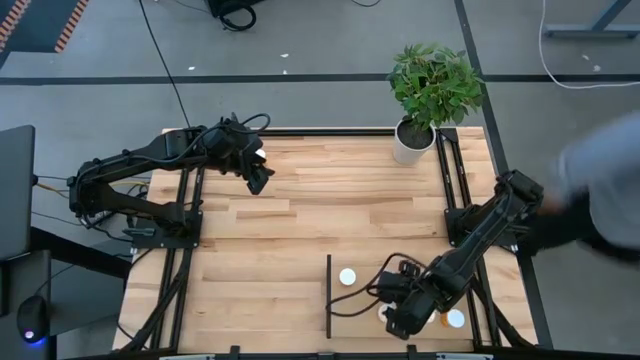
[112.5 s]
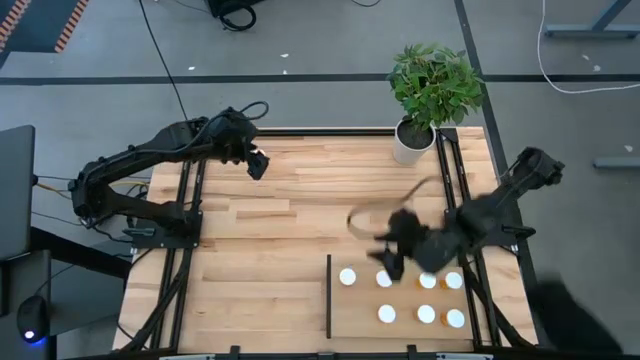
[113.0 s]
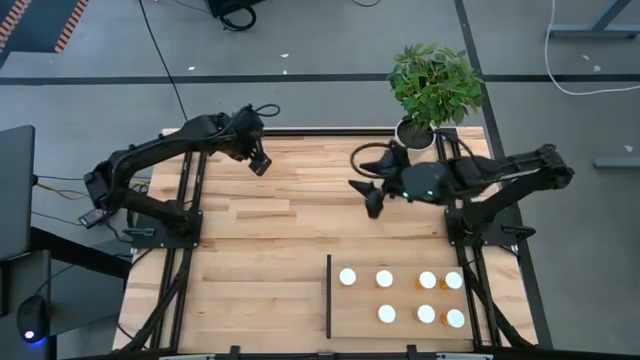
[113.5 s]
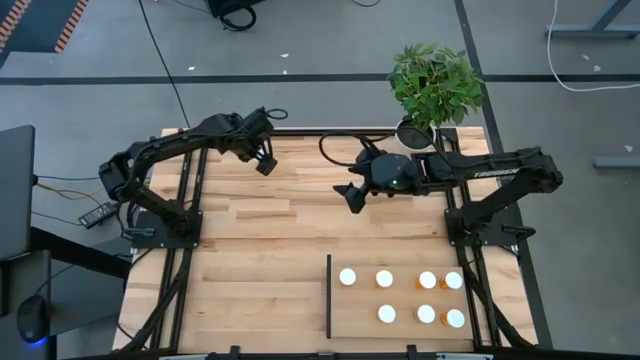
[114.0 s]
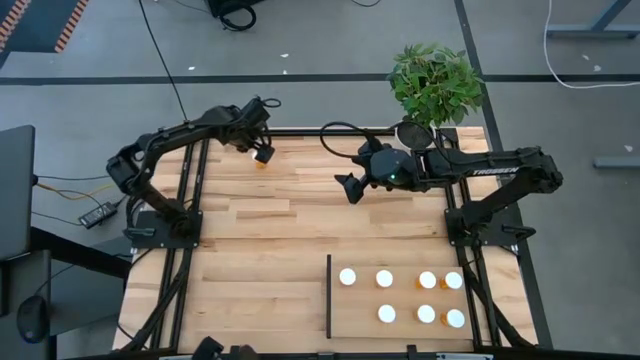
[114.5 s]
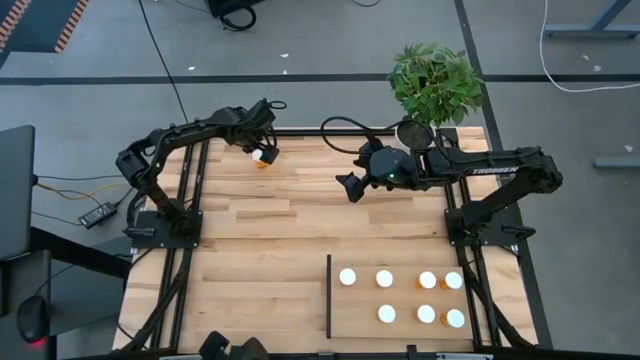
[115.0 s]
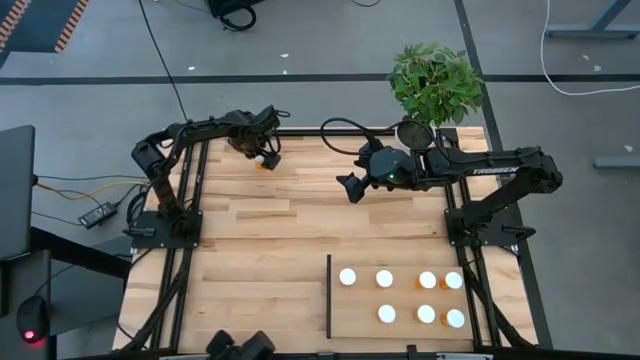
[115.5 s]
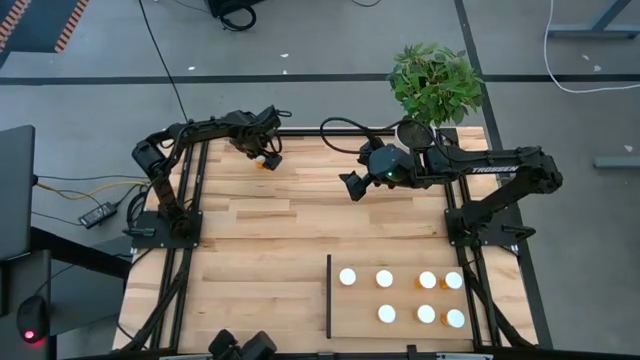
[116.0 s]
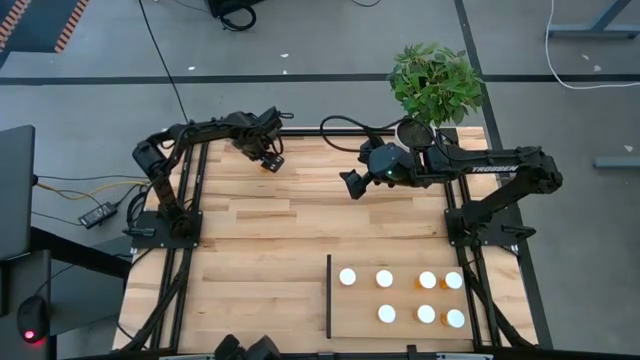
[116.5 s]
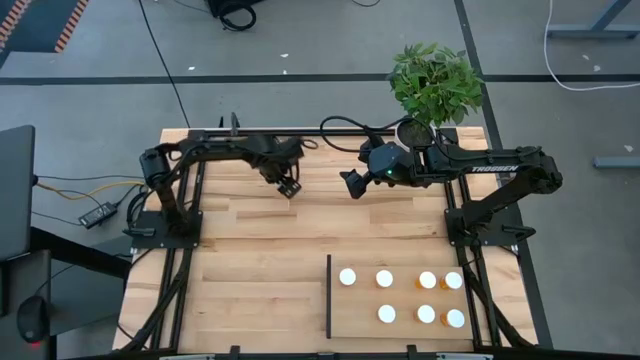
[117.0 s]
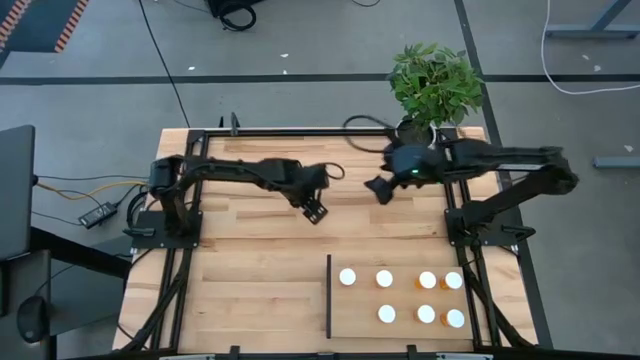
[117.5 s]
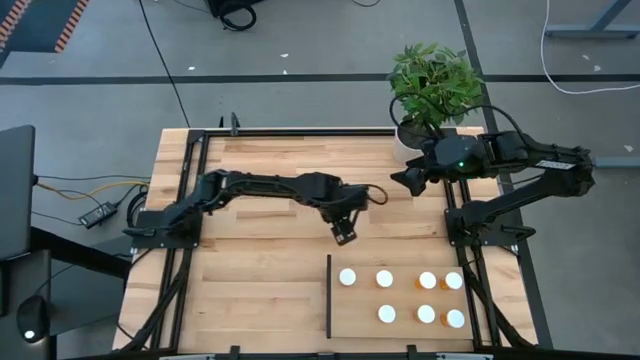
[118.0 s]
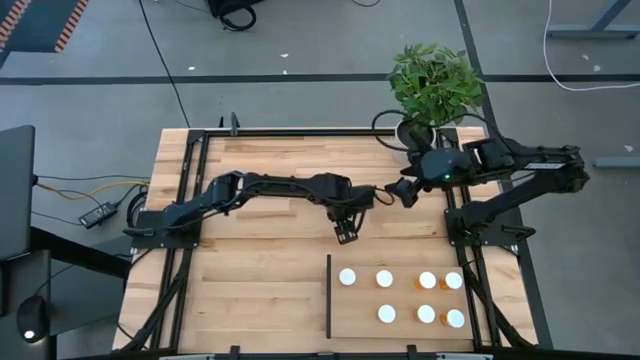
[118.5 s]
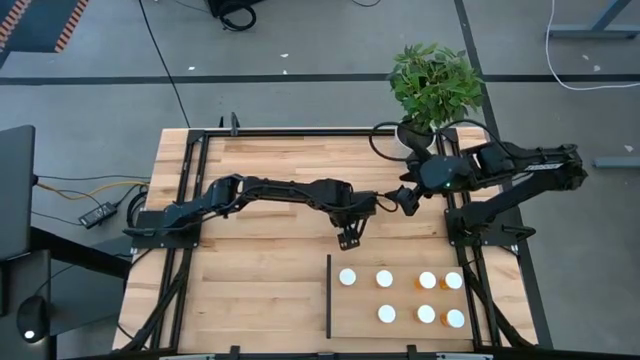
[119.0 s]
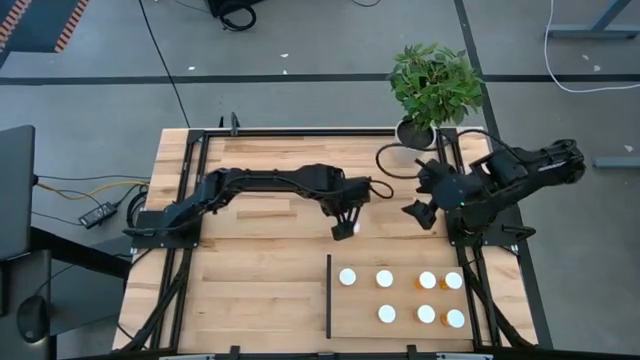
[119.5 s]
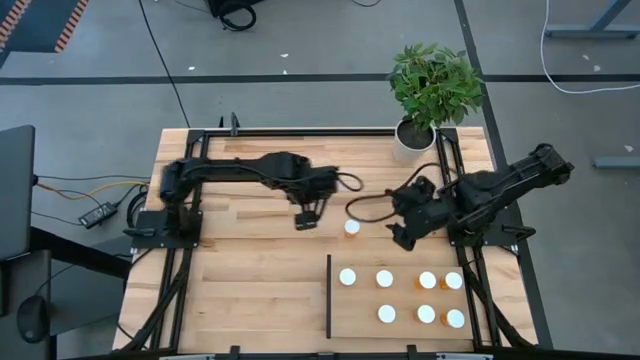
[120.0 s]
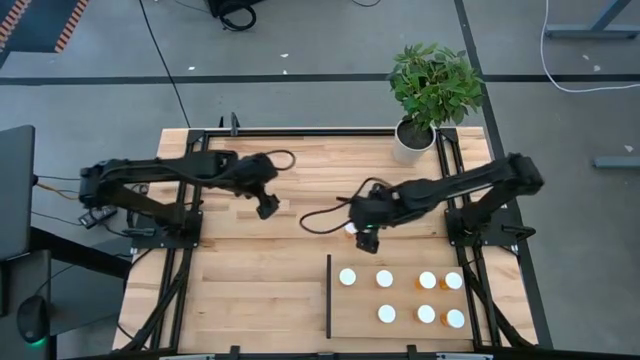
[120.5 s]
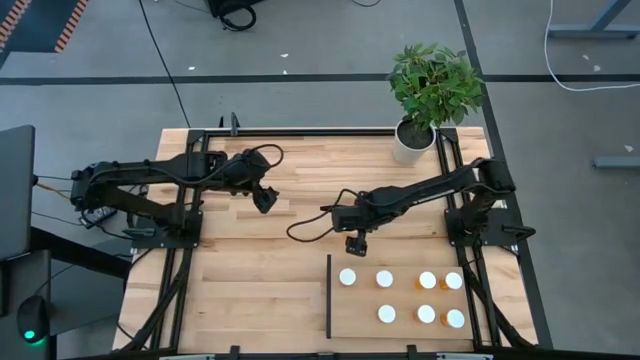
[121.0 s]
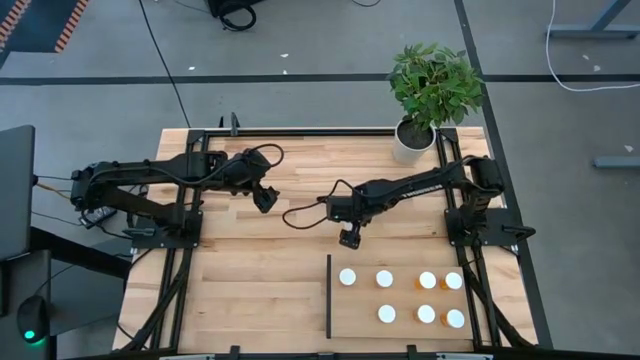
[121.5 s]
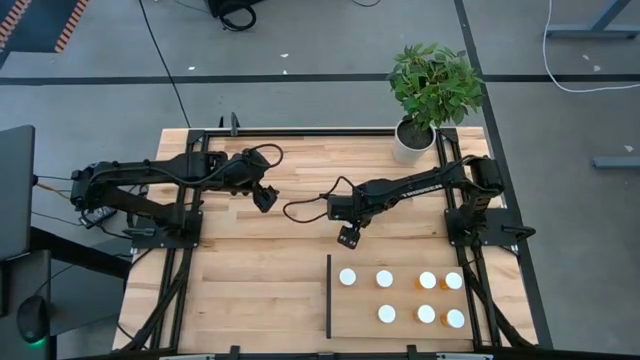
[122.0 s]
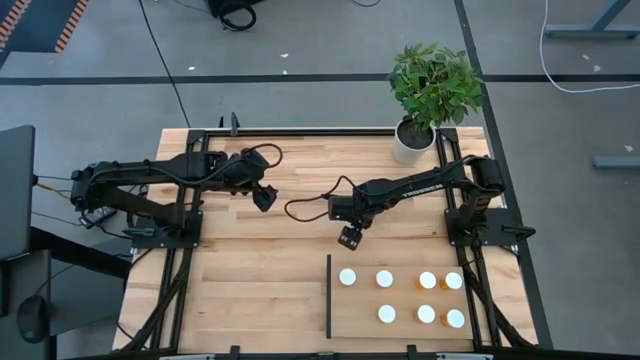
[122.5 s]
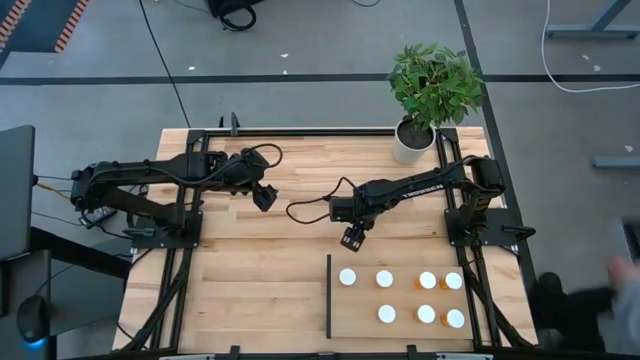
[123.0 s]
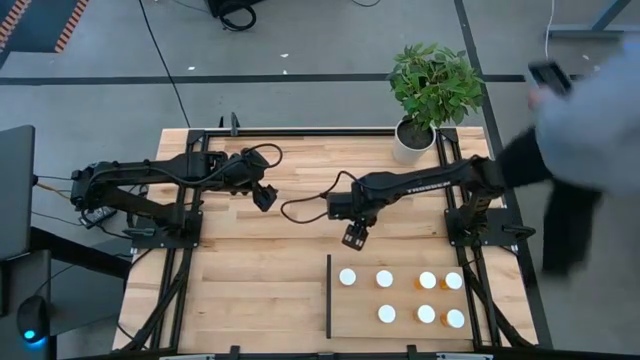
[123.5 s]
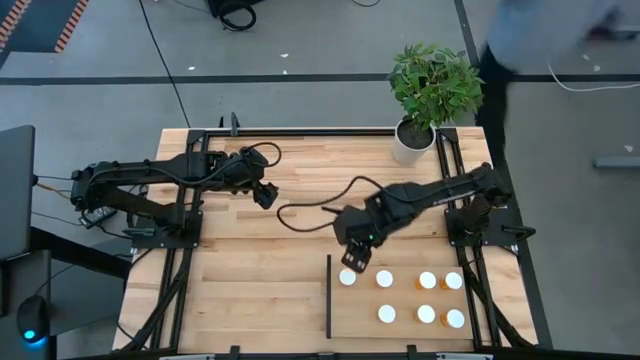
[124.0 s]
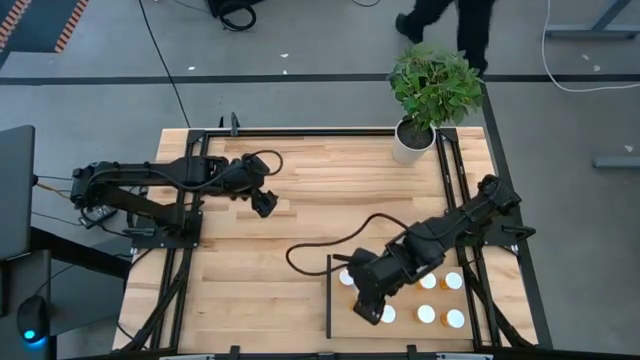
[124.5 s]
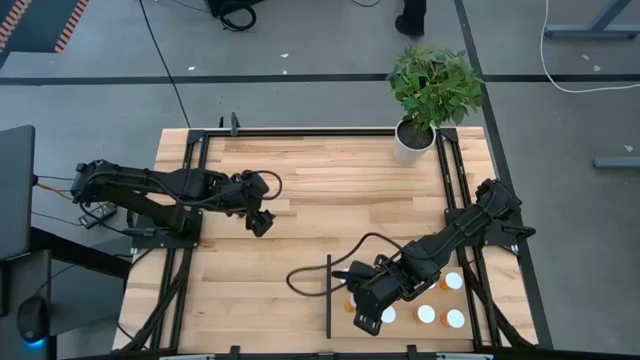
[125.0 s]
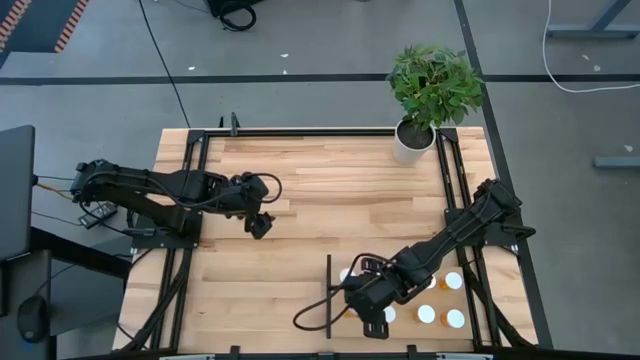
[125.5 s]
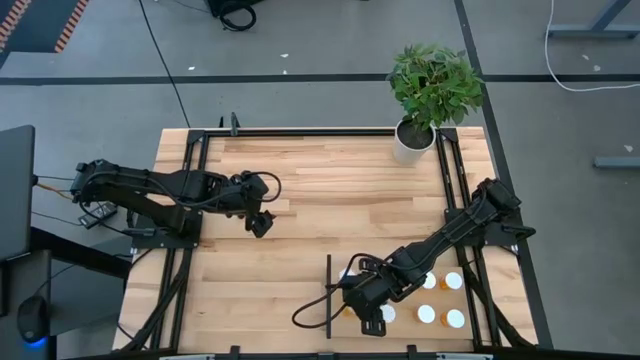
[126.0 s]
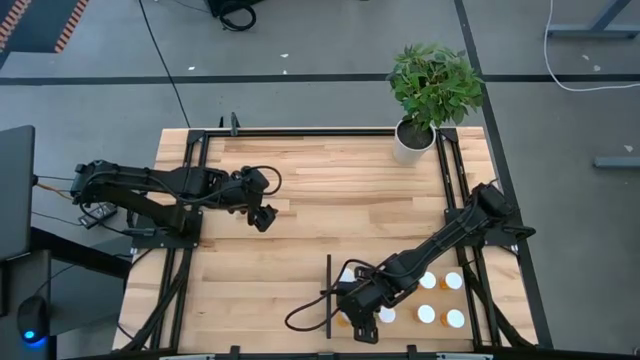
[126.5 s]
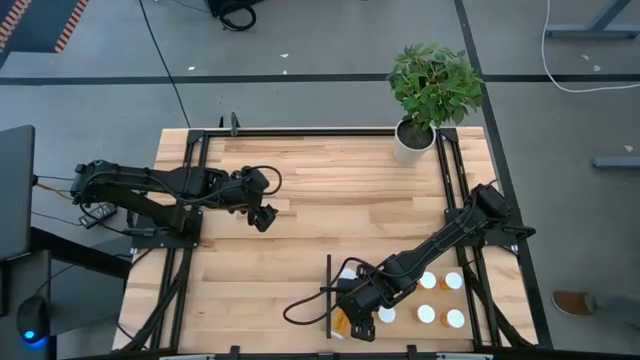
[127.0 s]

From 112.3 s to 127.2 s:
Task: Pick and place medicine bottles onto shelf by color
Put the orange pill bottle on the shelf aligned with the other orange pill bottles

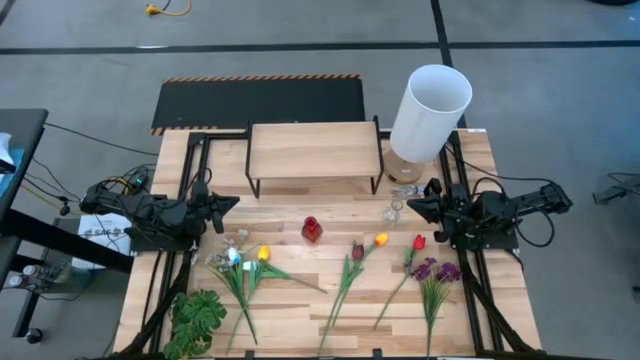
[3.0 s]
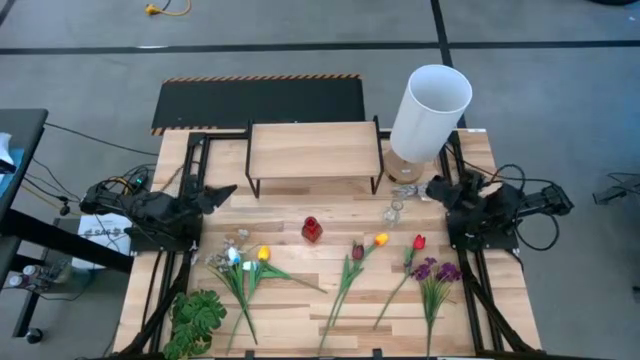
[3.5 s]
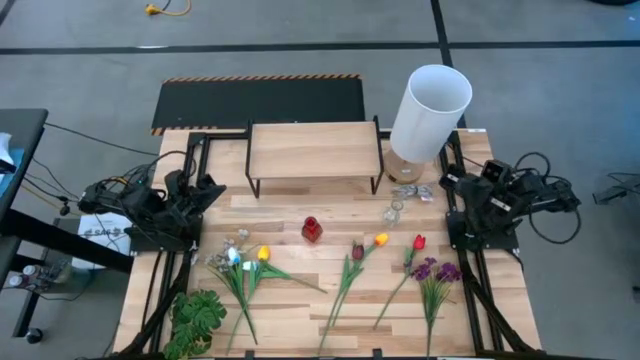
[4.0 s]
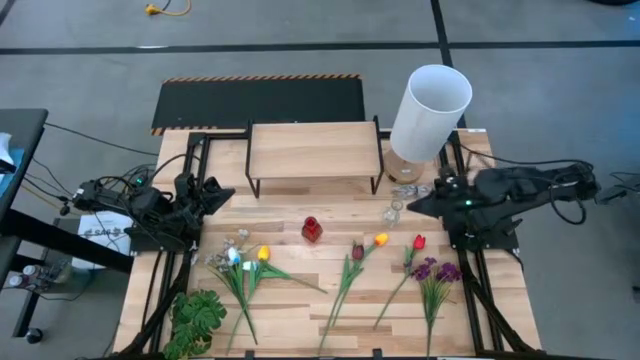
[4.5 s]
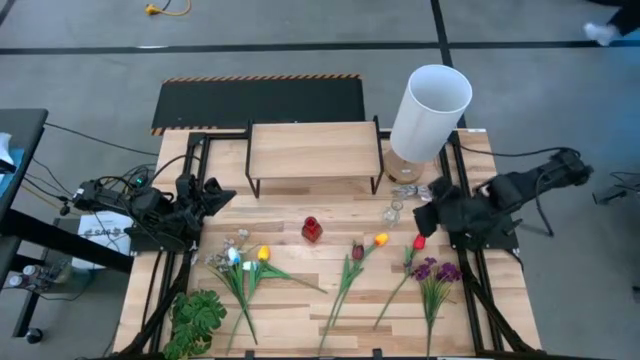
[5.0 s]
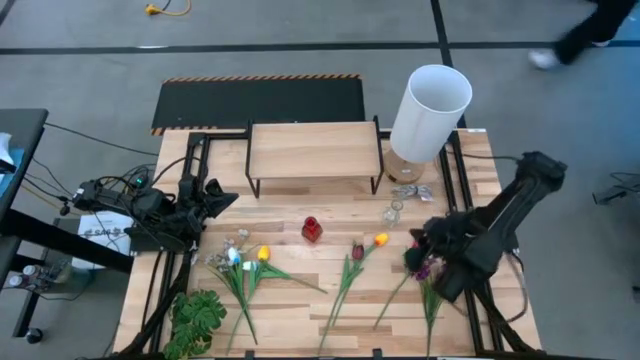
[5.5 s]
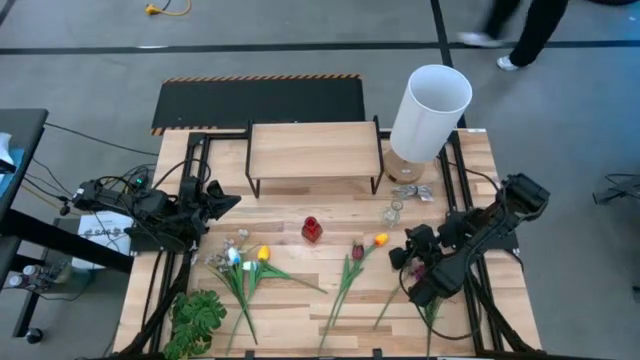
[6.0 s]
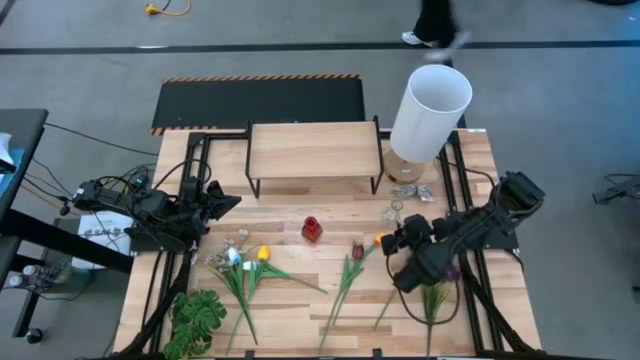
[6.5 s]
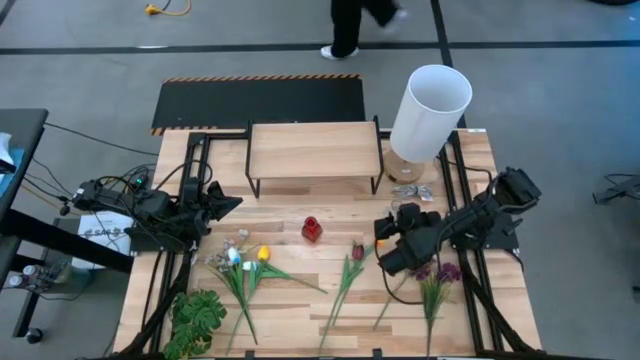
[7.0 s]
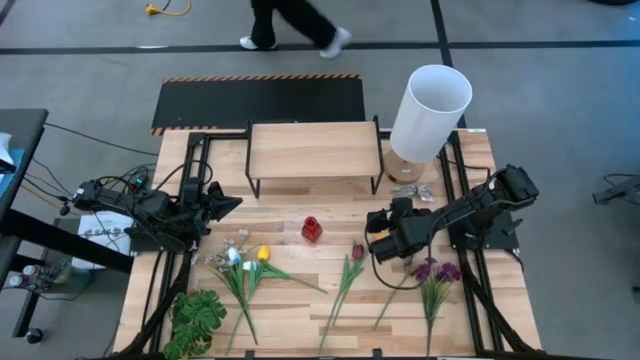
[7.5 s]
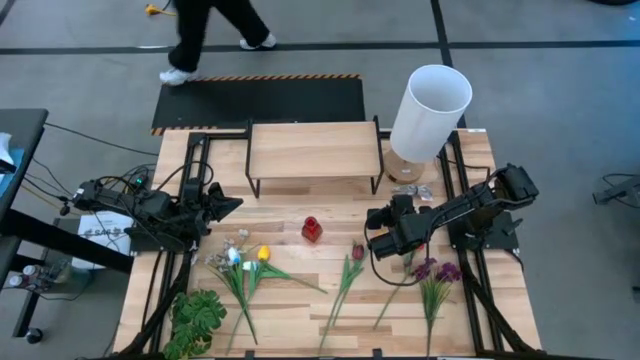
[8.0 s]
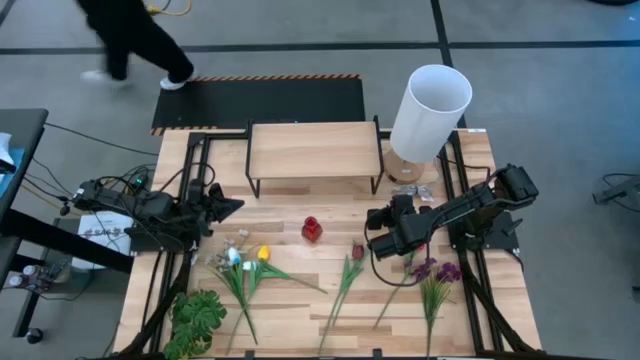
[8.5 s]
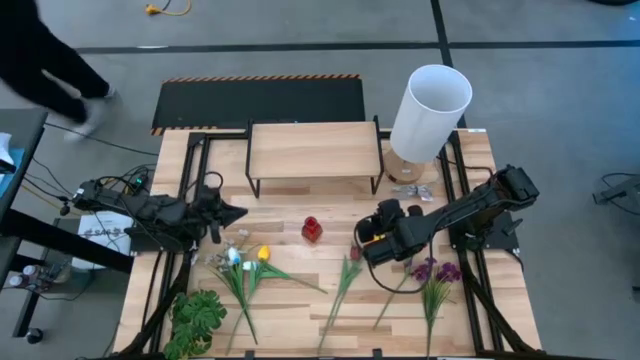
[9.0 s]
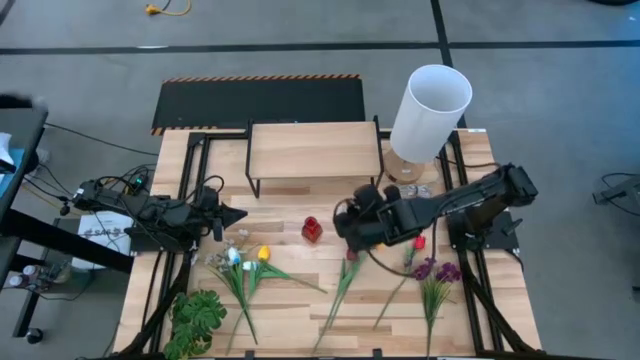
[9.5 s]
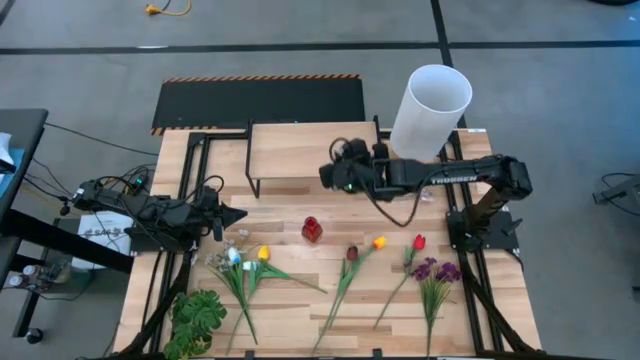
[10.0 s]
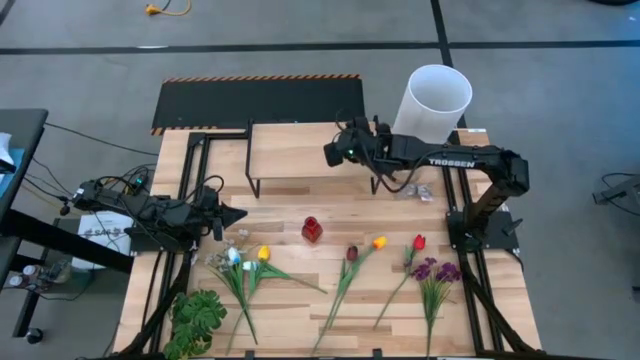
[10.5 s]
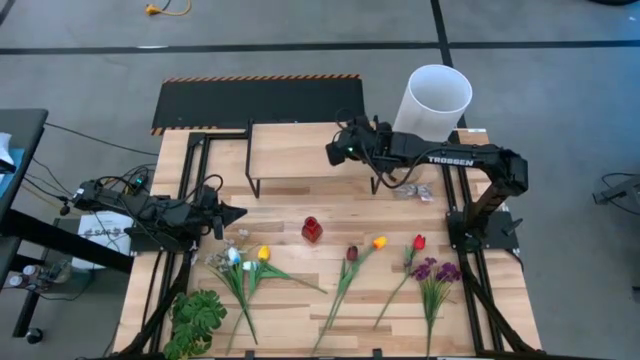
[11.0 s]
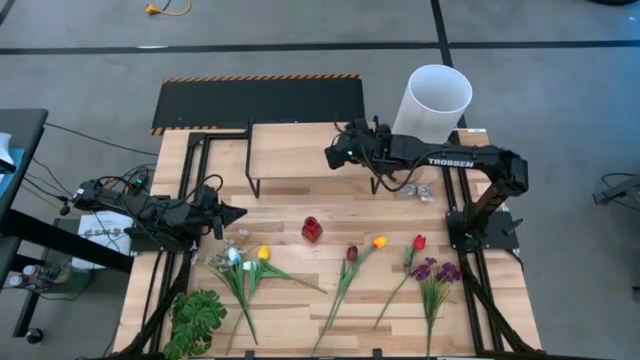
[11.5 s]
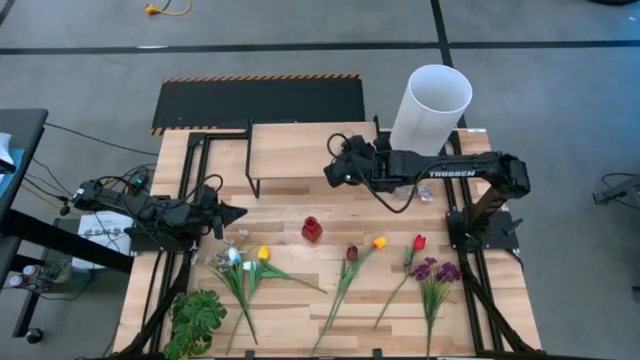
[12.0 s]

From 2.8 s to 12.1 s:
Task: Pick and place flowers into a vace then onto a shelf
Put the transparent vase on the shelf
